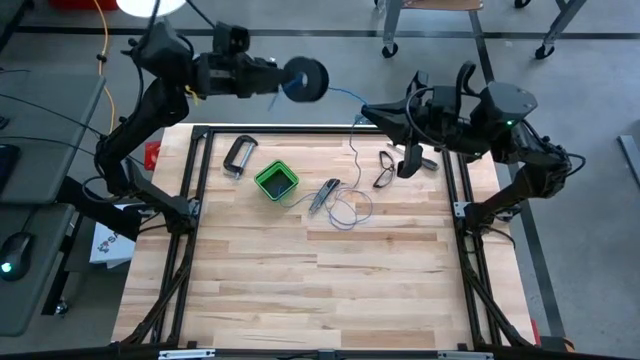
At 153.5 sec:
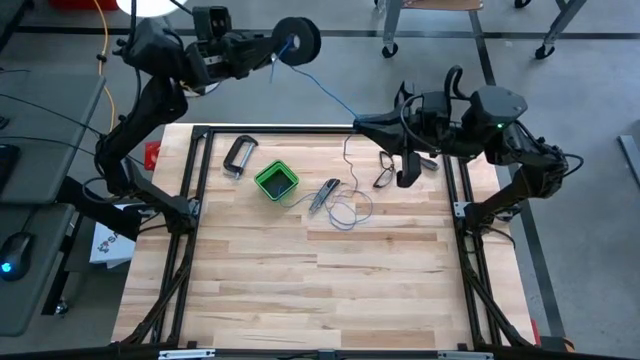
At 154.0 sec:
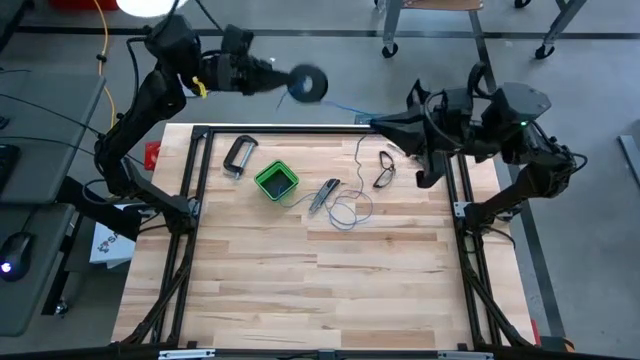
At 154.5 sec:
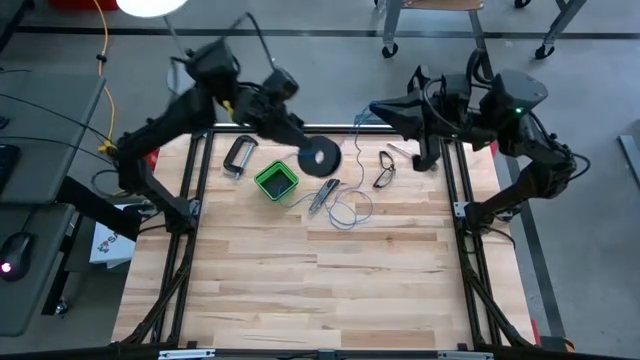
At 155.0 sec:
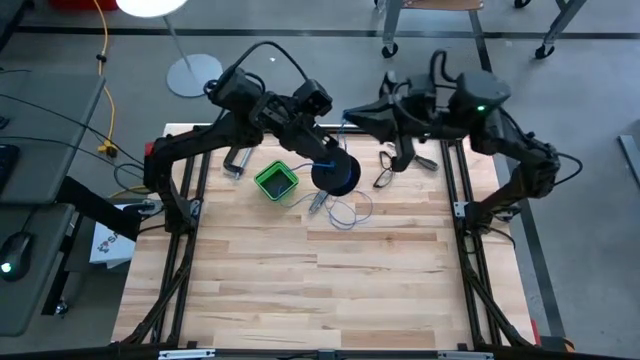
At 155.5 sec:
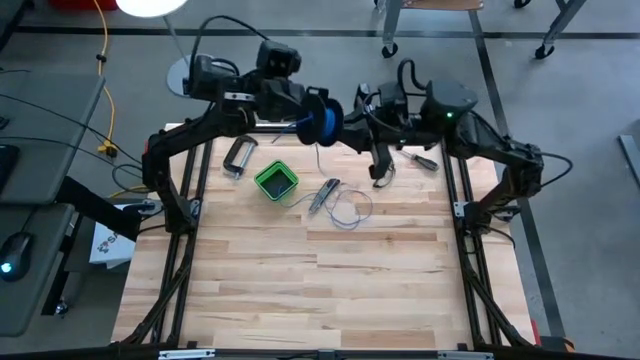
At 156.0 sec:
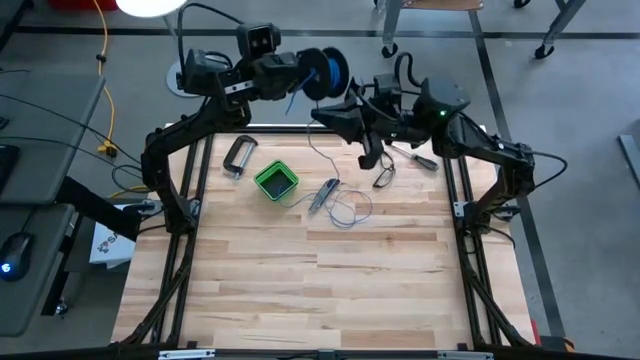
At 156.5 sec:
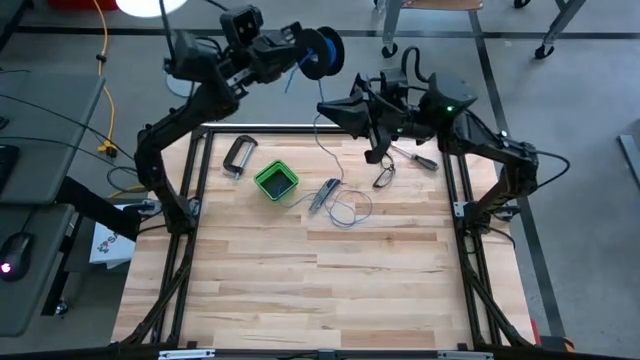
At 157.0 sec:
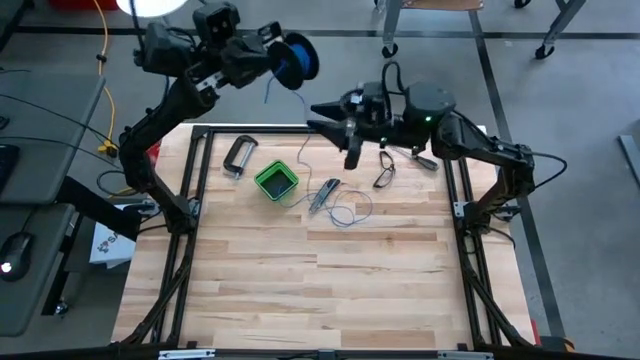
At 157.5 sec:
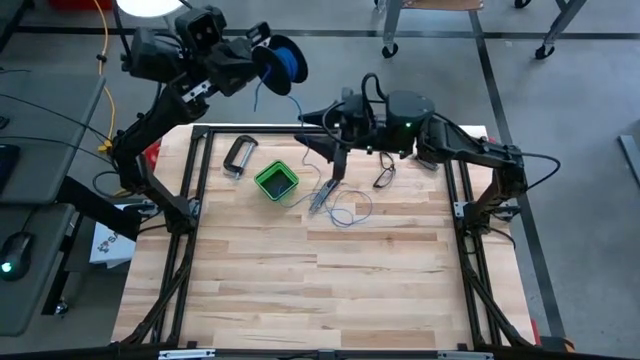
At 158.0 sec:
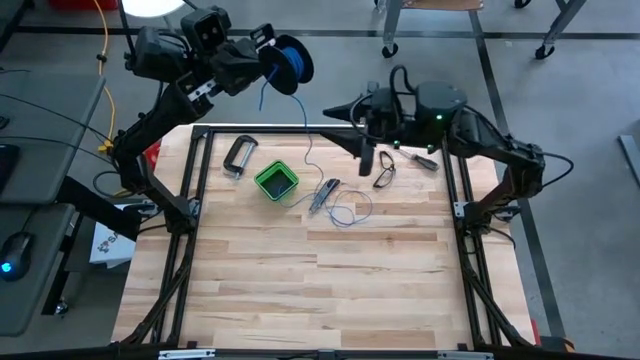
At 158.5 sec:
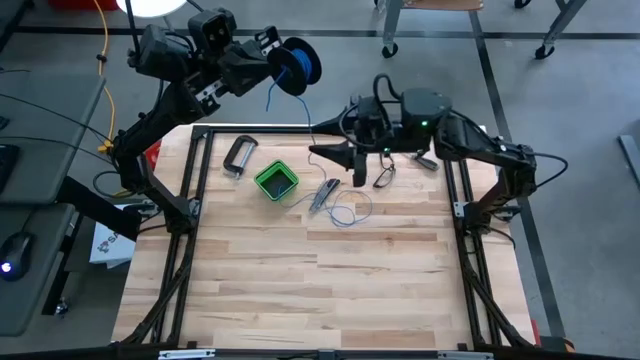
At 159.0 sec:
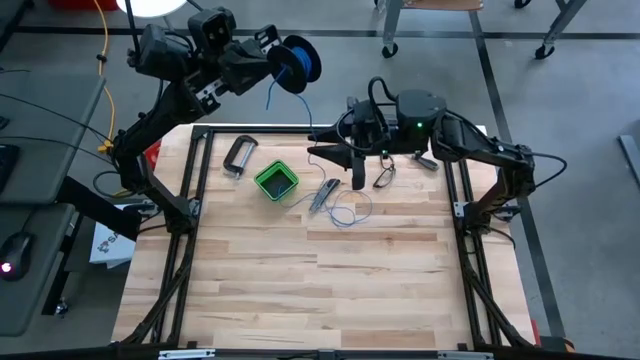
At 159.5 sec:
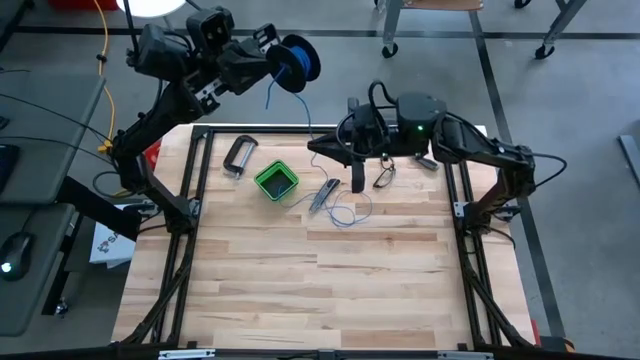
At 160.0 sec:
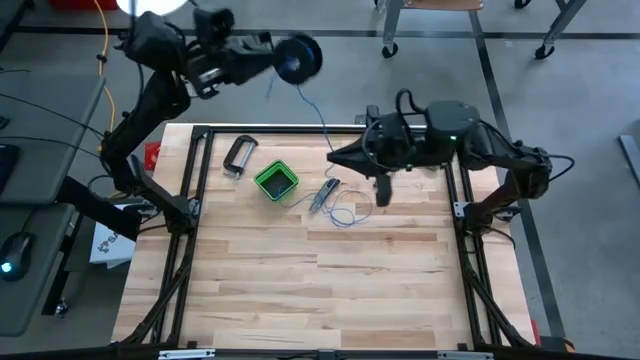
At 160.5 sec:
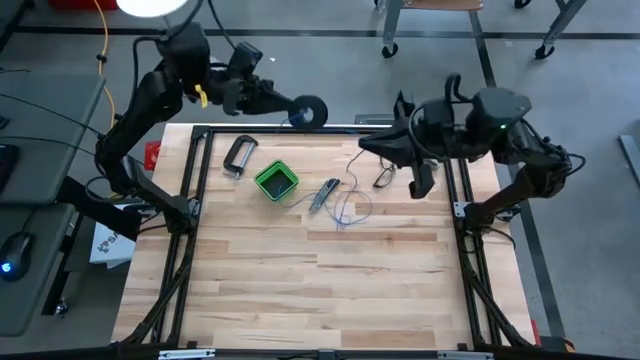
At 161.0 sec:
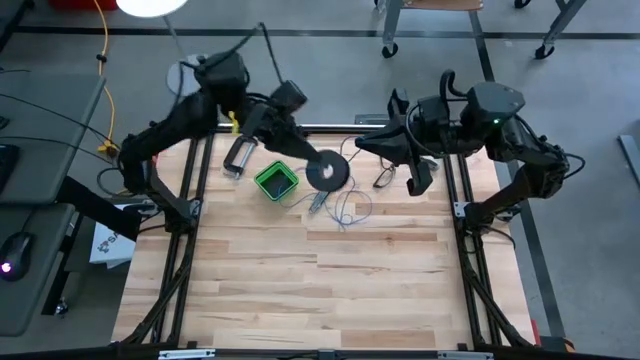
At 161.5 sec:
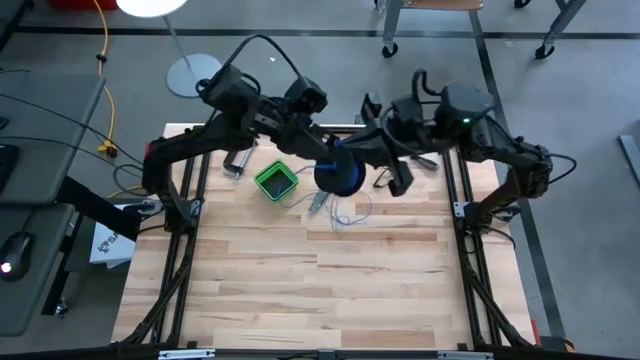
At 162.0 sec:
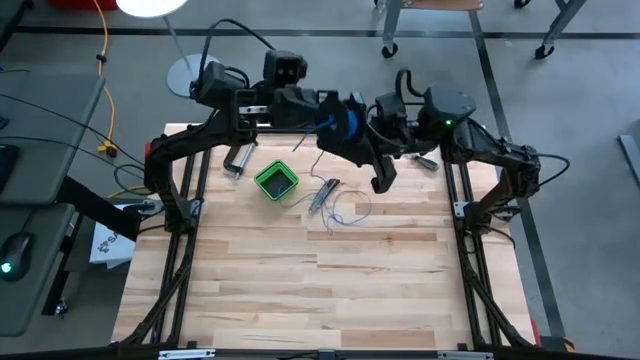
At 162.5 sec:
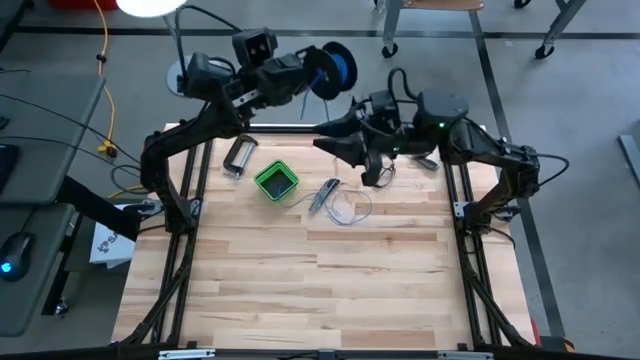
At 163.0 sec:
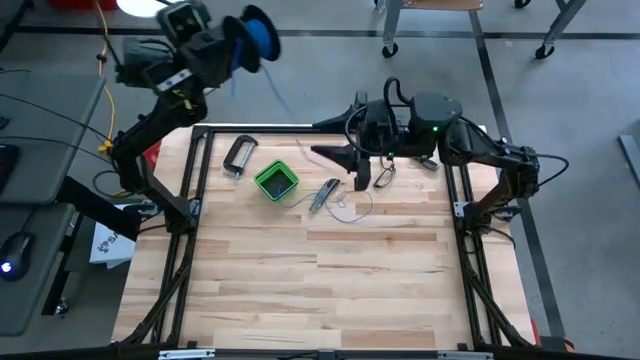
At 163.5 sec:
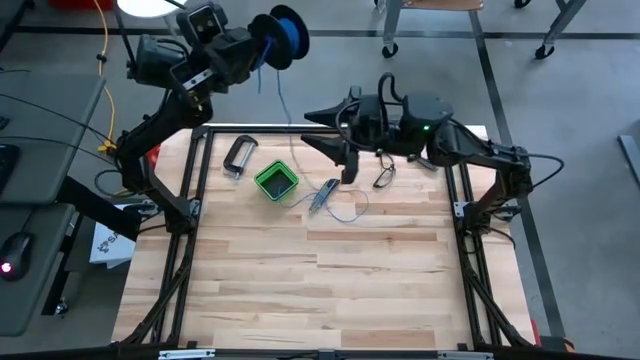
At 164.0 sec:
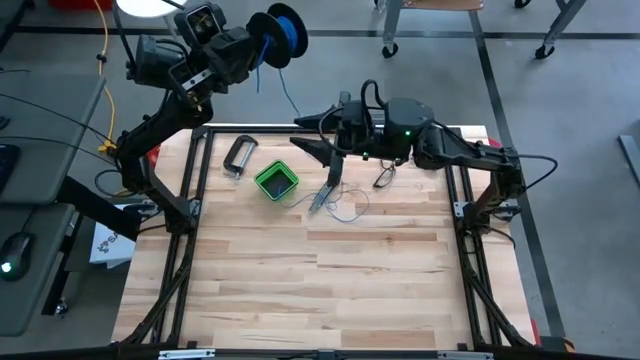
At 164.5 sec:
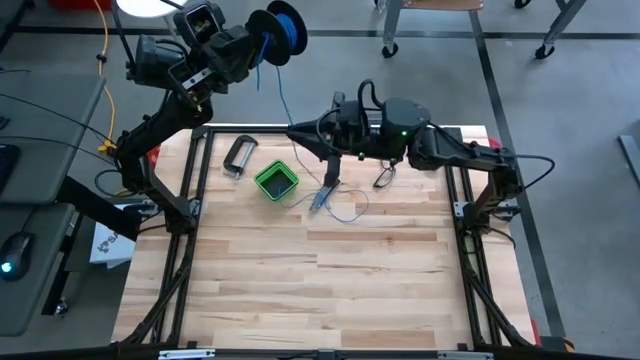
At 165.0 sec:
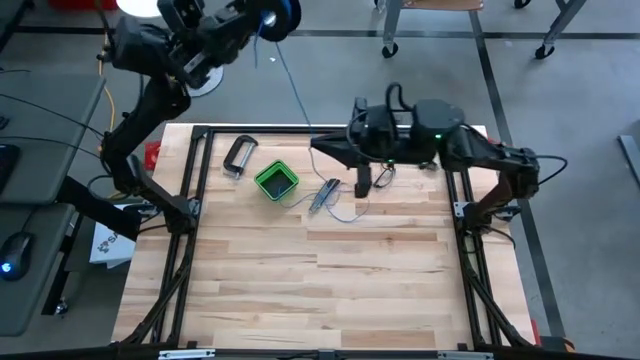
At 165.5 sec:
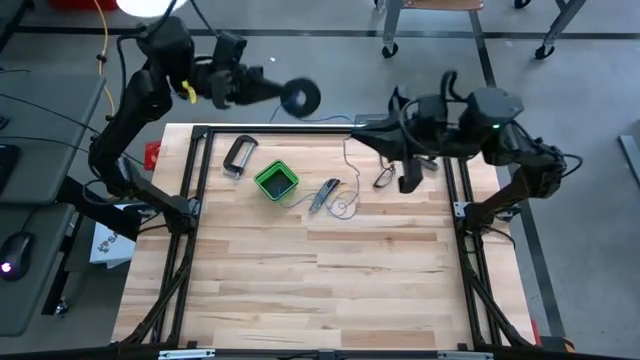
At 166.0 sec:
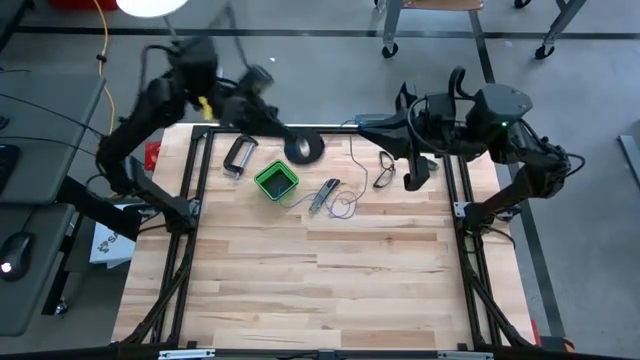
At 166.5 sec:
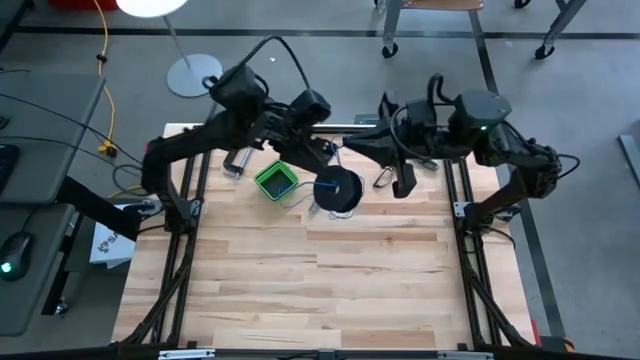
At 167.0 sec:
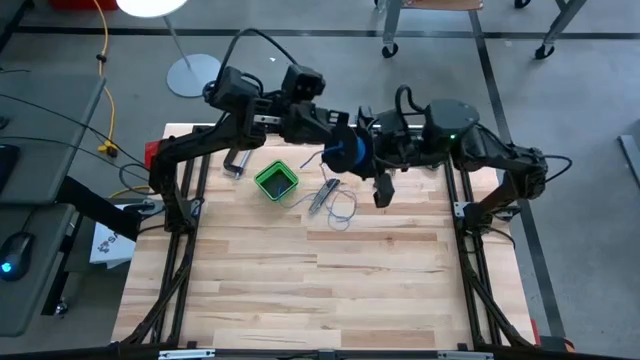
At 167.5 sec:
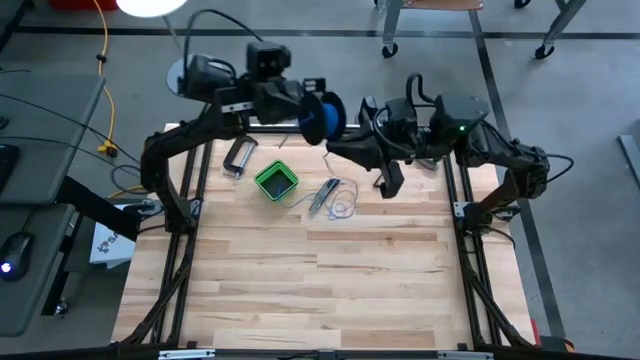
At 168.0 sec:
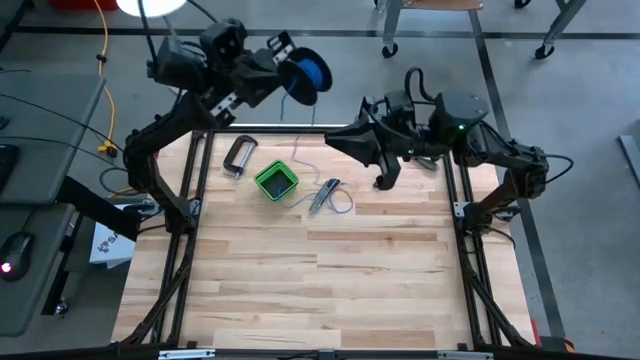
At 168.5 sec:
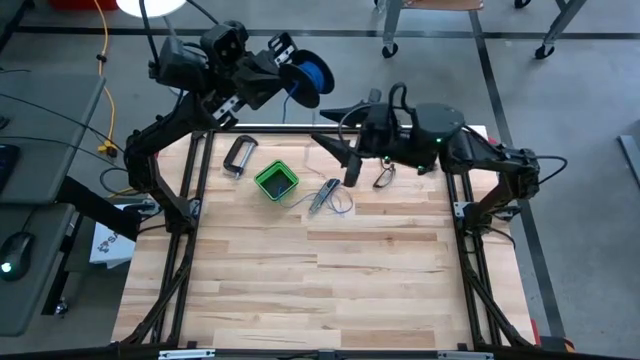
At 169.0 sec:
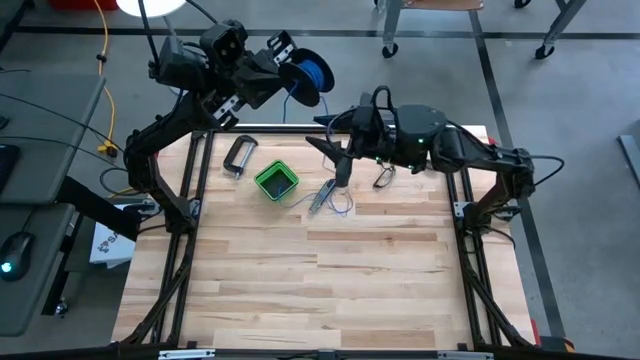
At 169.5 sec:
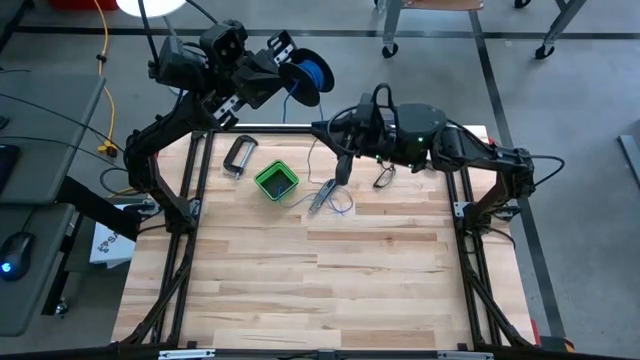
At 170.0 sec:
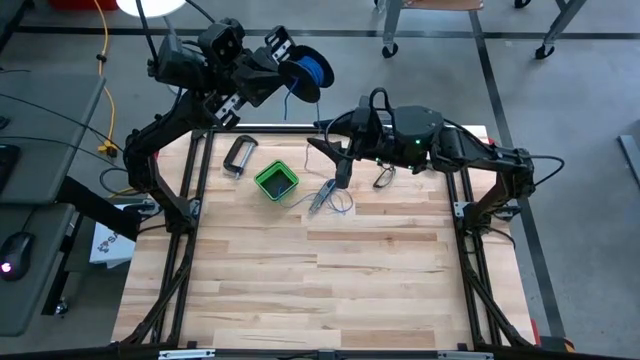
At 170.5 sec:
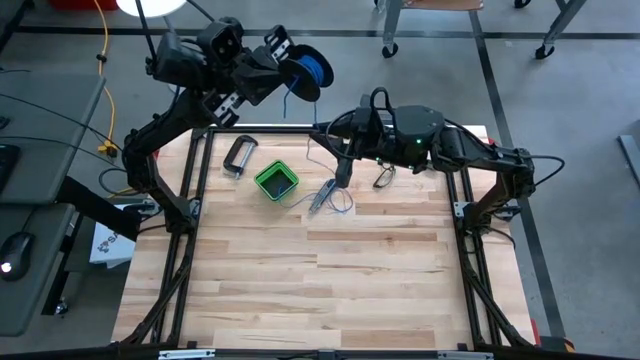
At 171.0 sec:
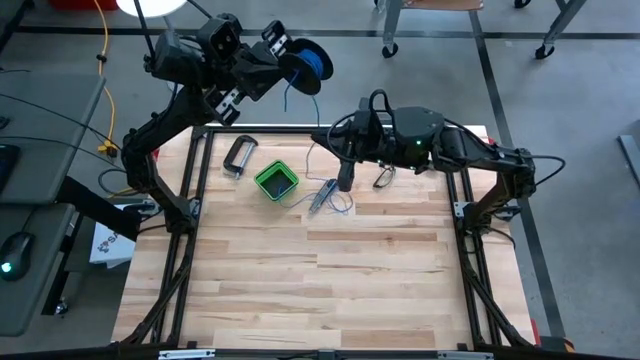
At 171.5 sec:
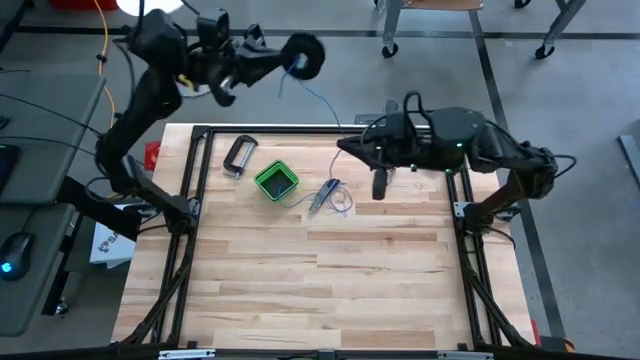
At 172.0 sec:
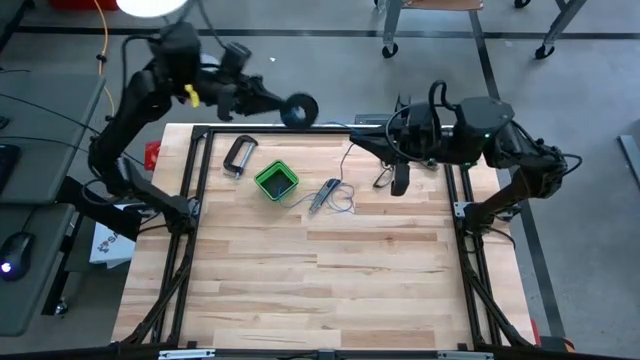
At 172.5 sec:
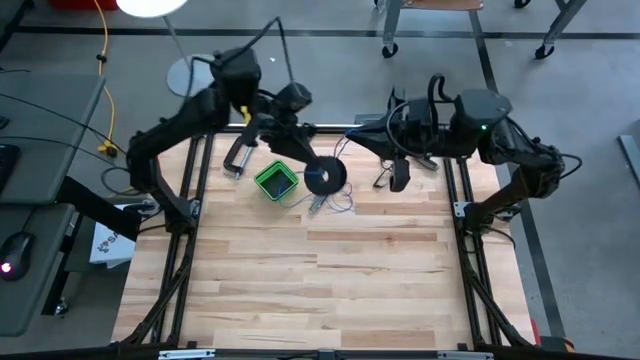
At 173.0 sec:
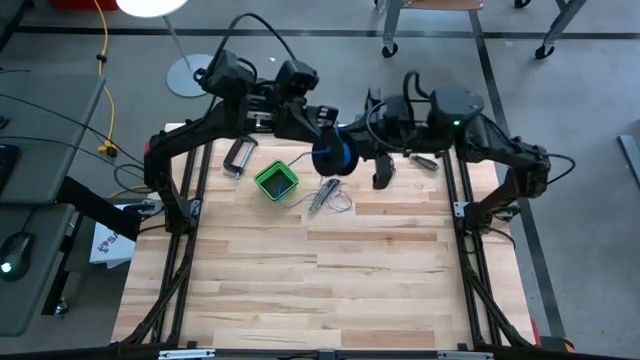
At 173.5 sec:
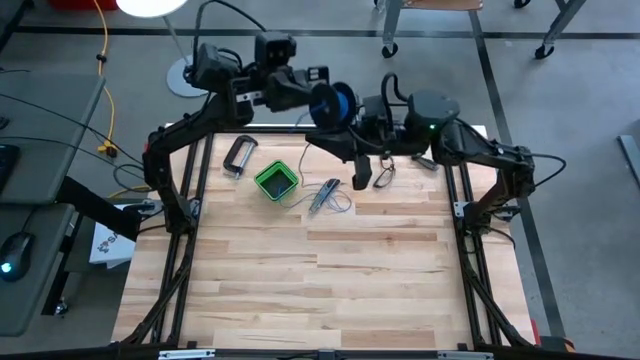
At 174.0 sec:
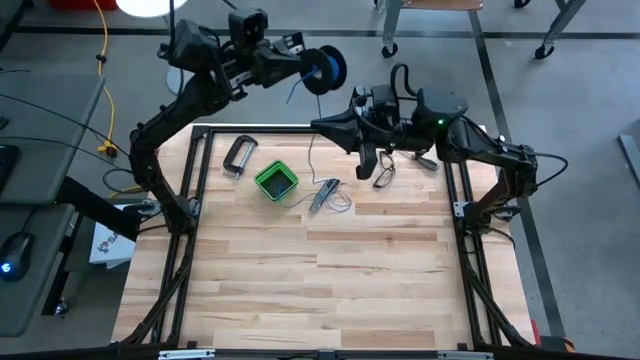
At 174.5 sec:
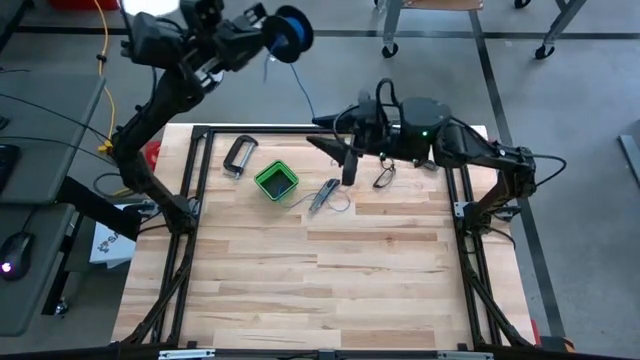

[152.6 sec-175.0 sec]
Task: Coil cords
Coil the blue wire onto the spool
